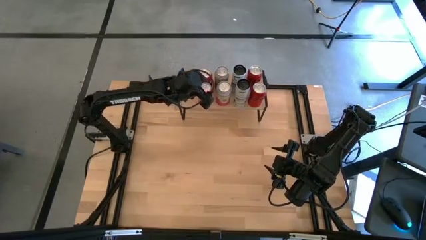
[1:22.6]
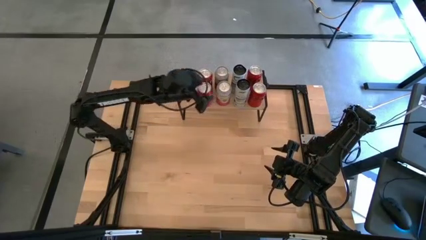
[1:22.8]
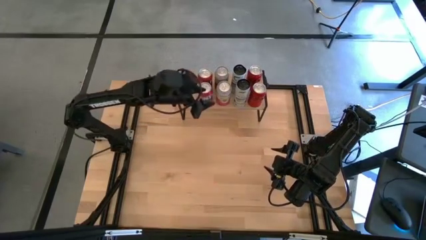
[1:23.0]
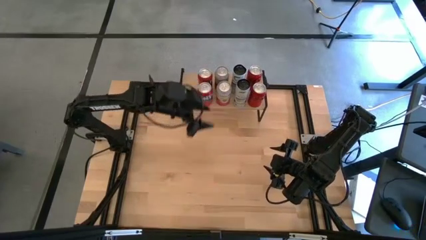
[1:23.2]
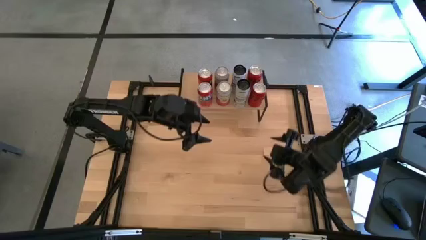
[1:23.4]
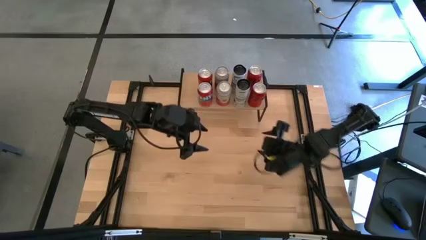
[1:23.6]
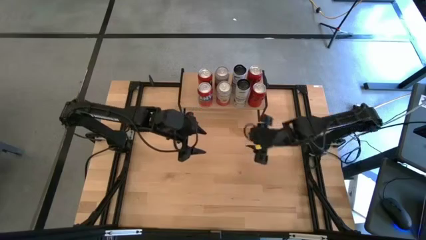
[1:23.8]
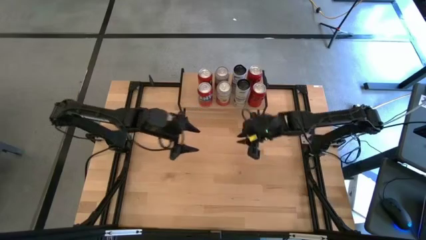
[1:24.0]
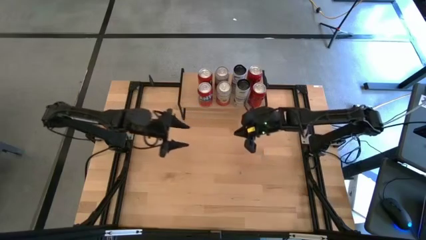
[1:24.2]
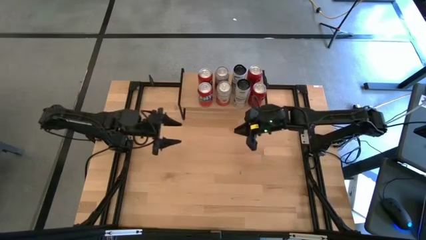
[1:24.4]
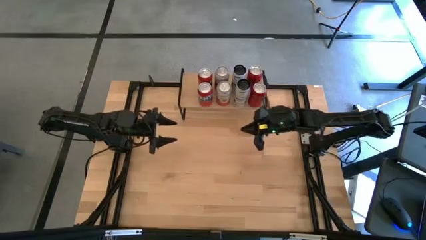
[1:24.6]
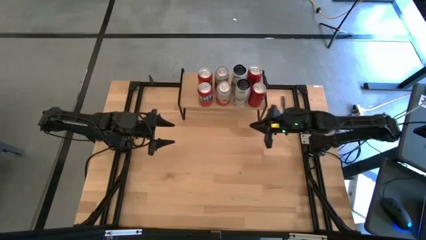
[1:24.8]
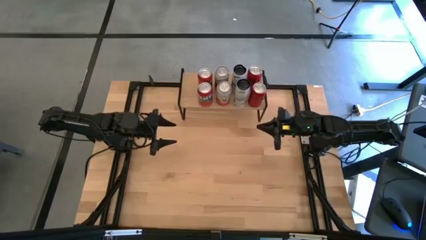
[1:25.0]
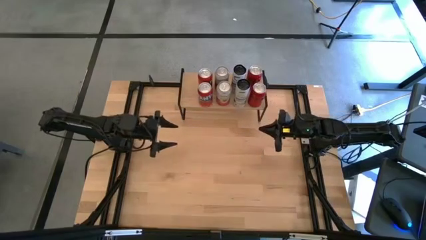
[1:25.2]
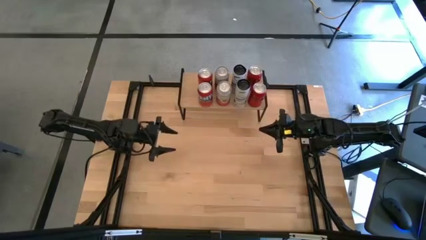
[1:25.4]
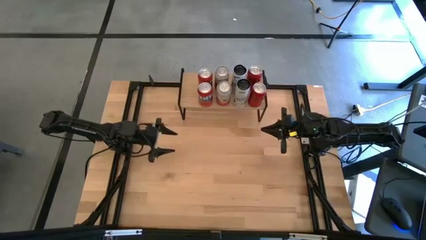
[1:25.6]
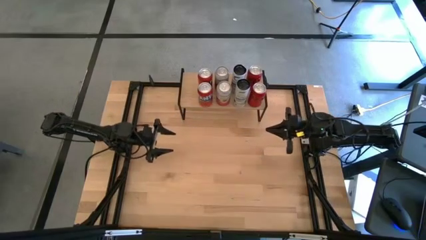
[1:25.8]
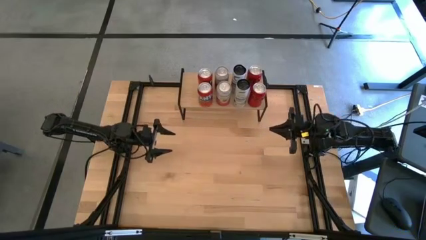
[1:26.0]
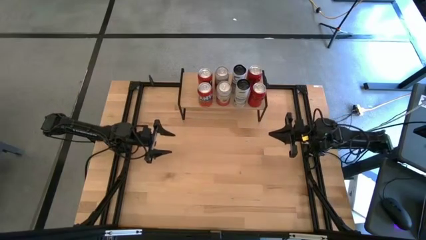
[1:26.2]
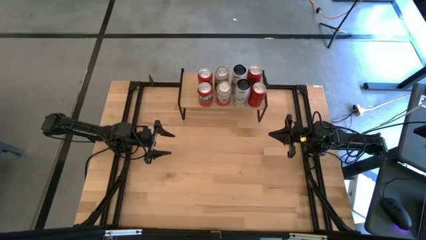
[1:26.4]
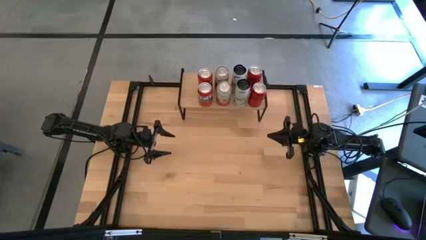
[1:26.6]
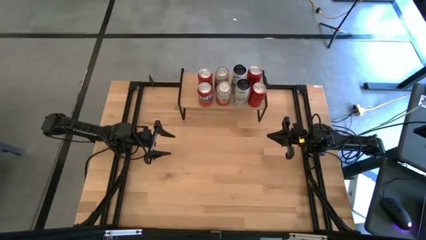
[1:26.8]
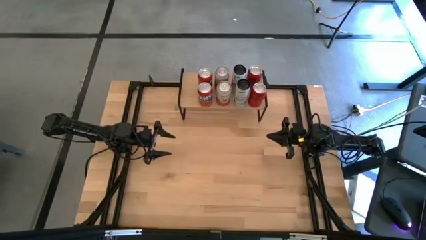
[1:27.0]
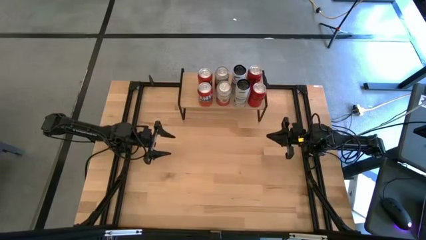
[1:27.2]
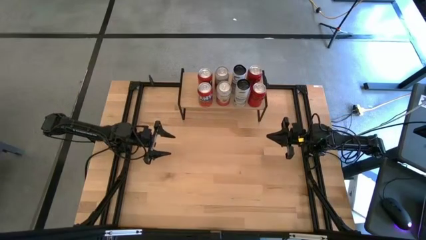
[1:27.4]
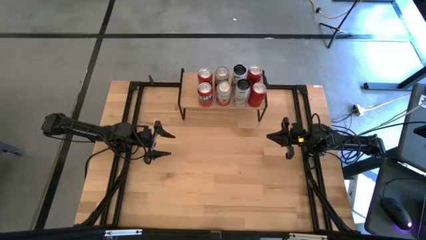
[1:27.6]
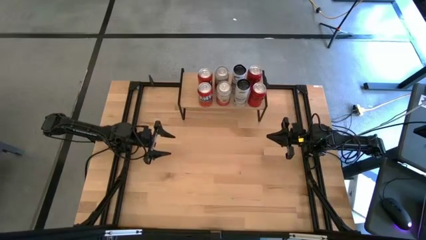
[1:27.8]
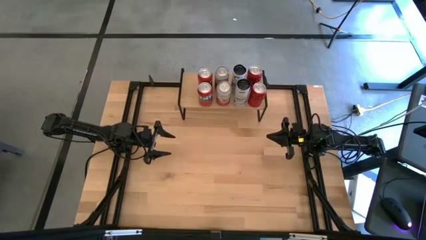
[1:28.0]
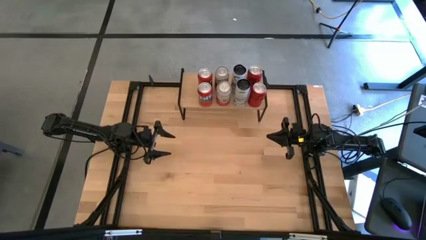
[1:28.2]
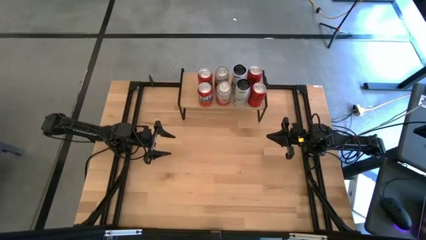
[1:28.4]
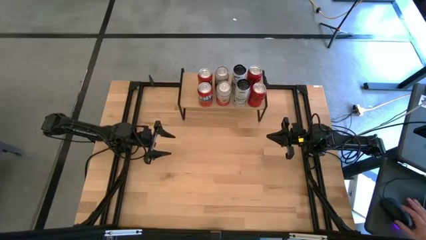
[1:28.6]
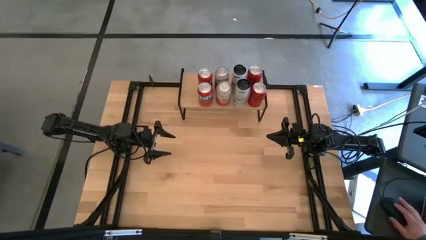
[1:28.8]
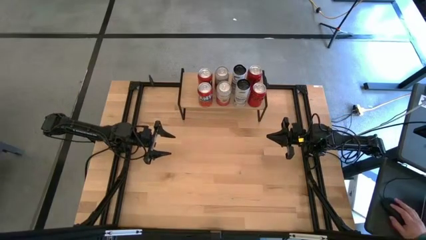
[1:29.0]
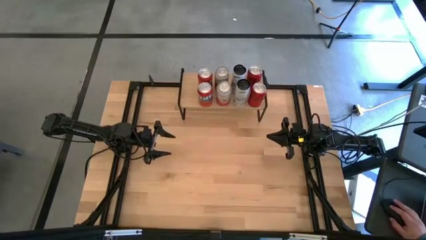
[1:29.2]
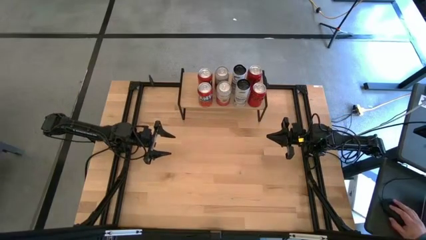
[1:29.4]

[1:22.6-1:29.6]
Task: Place canned beverage on shelf
Return to Home Position

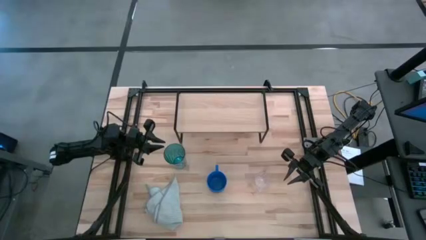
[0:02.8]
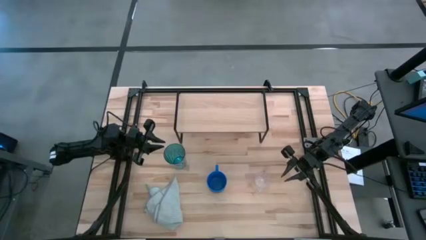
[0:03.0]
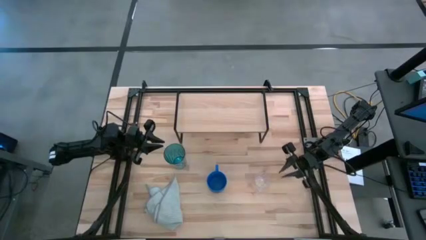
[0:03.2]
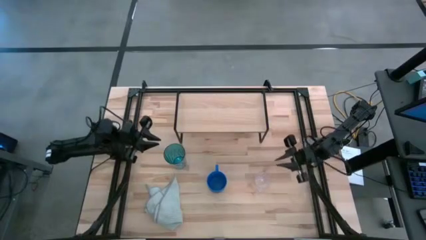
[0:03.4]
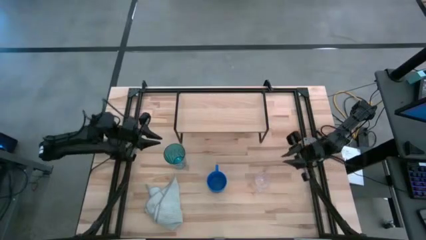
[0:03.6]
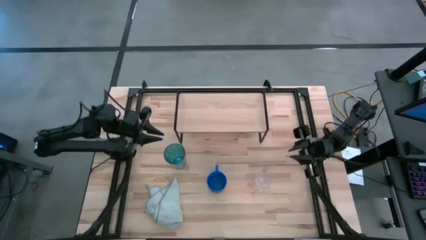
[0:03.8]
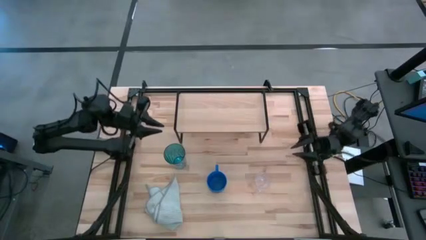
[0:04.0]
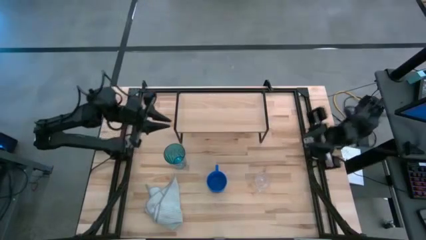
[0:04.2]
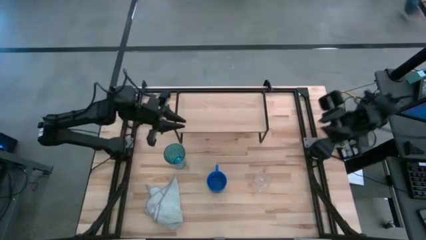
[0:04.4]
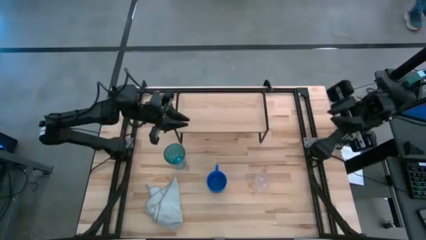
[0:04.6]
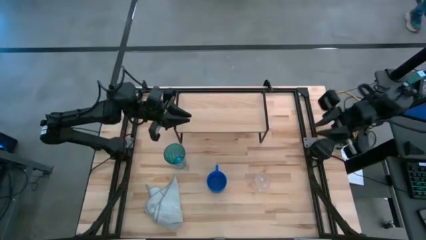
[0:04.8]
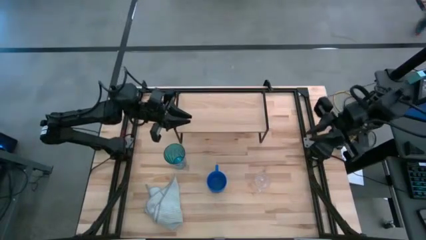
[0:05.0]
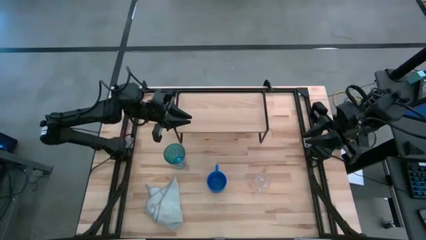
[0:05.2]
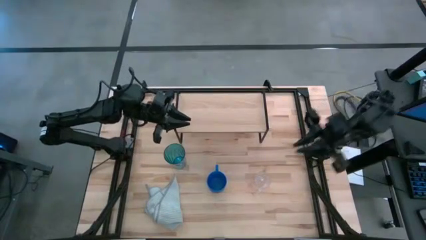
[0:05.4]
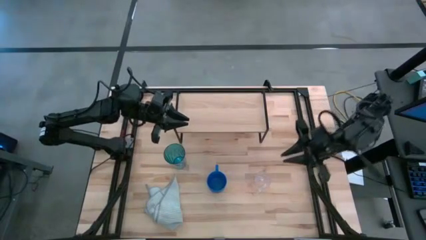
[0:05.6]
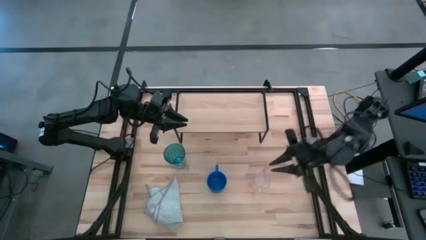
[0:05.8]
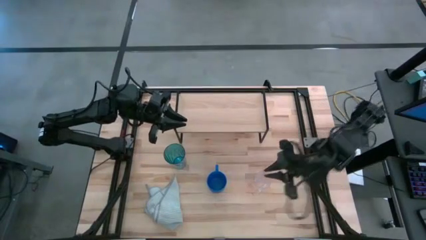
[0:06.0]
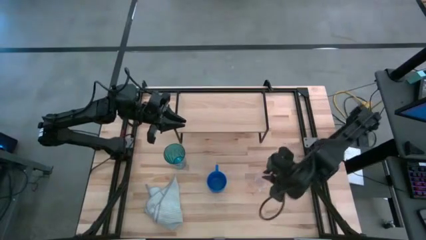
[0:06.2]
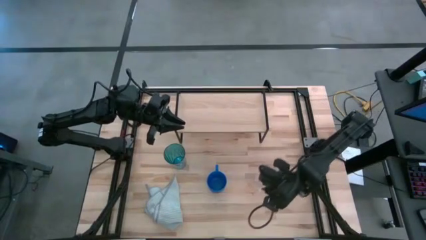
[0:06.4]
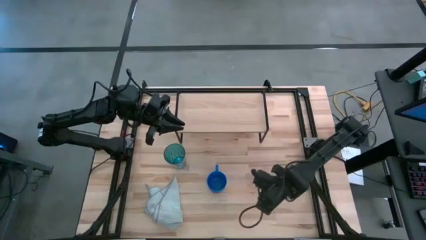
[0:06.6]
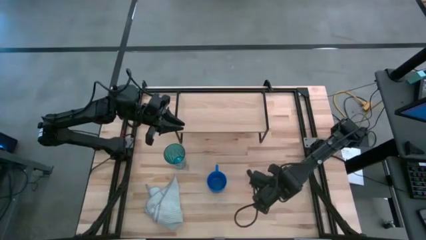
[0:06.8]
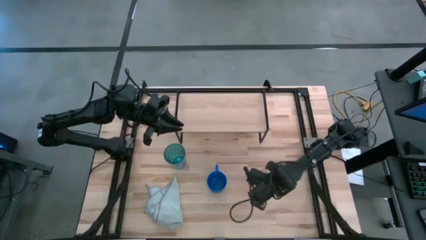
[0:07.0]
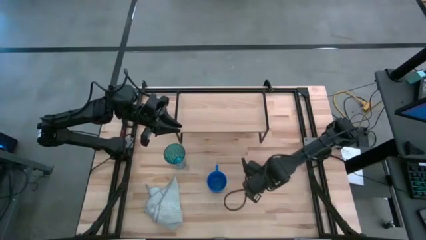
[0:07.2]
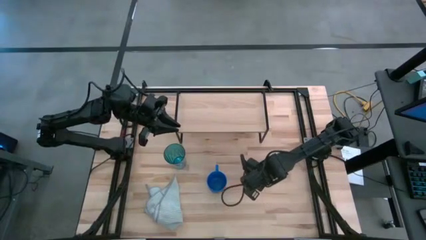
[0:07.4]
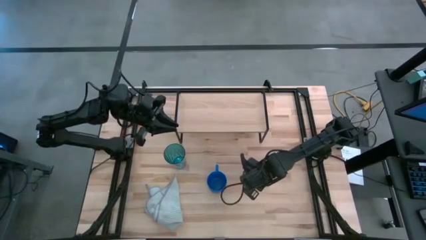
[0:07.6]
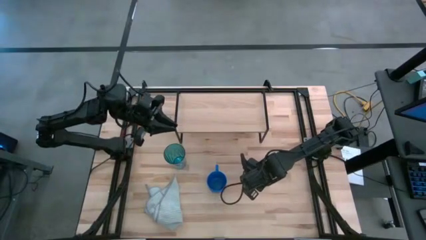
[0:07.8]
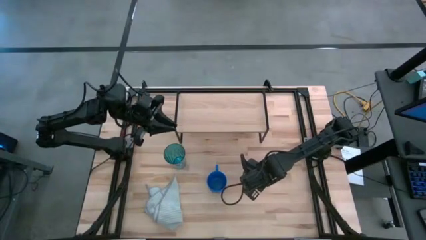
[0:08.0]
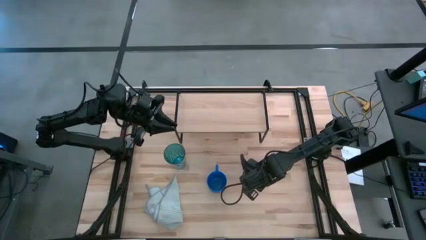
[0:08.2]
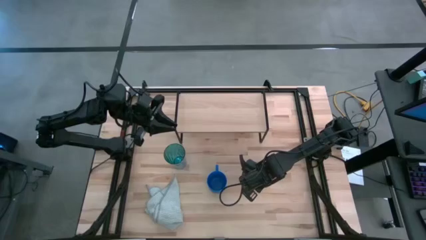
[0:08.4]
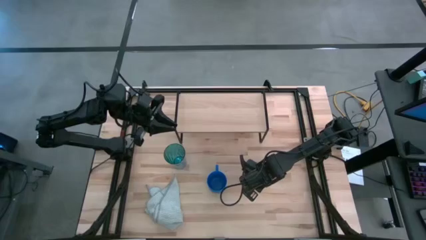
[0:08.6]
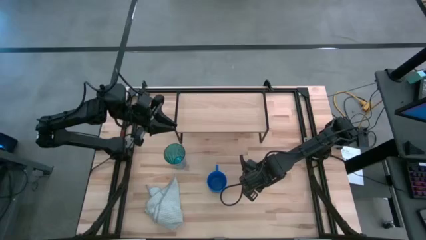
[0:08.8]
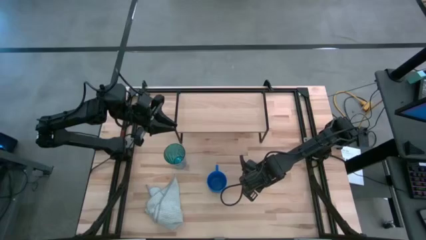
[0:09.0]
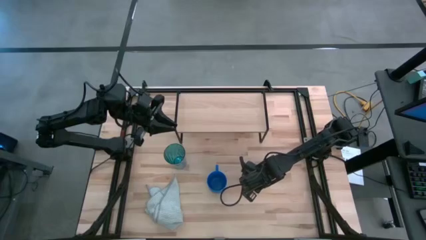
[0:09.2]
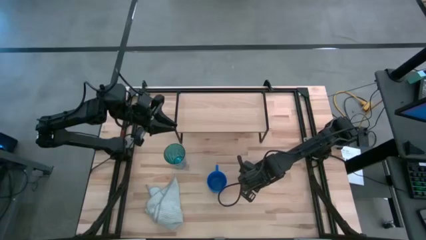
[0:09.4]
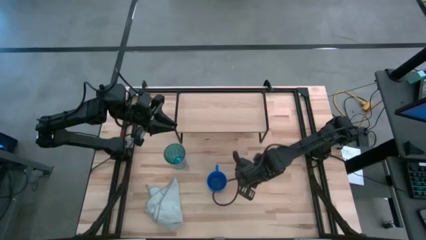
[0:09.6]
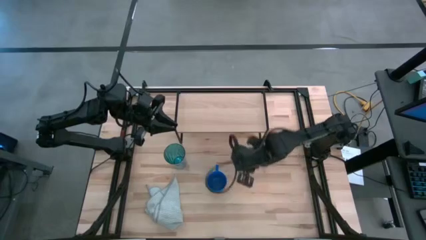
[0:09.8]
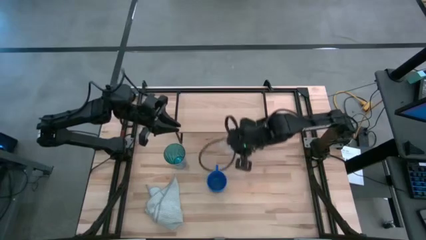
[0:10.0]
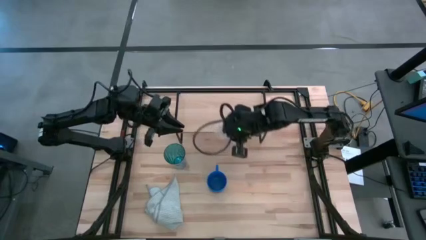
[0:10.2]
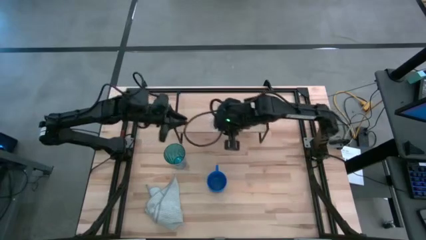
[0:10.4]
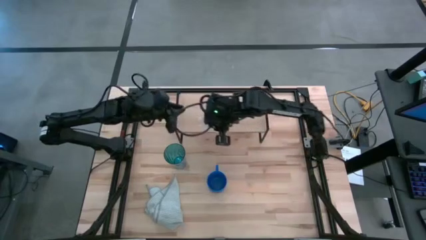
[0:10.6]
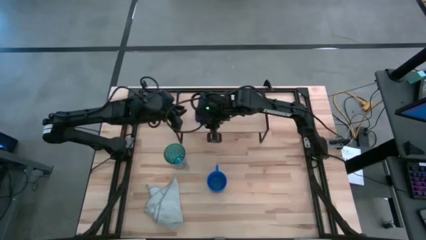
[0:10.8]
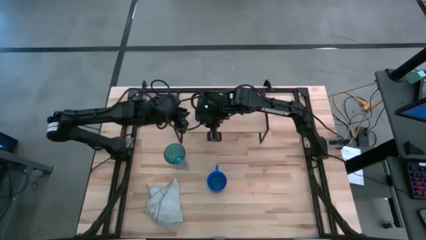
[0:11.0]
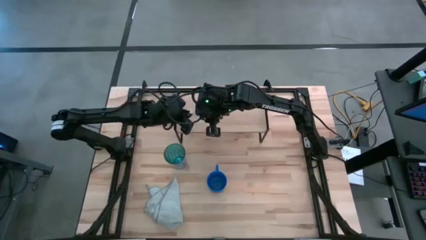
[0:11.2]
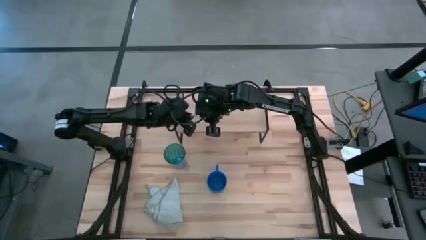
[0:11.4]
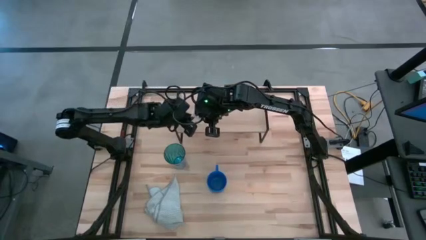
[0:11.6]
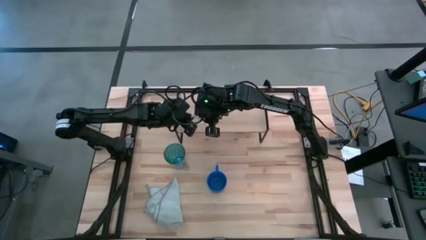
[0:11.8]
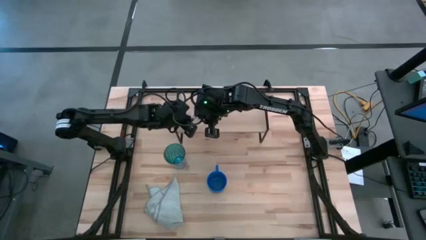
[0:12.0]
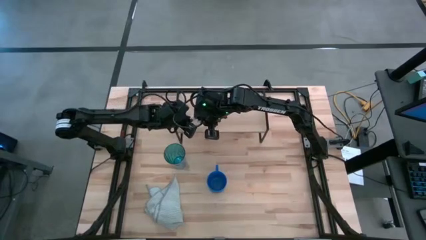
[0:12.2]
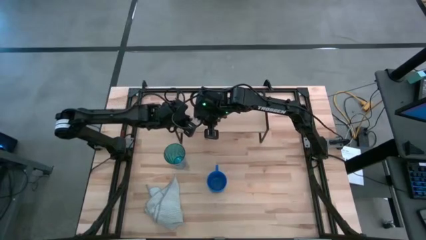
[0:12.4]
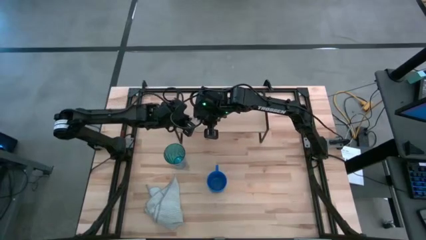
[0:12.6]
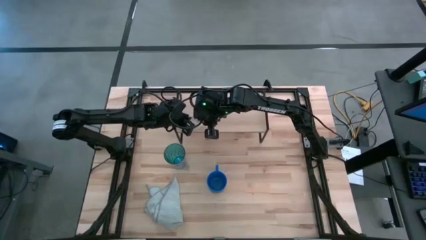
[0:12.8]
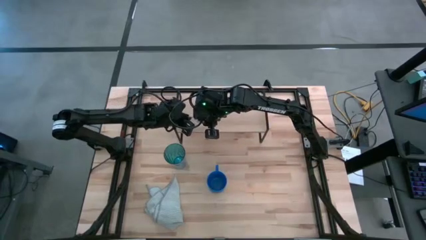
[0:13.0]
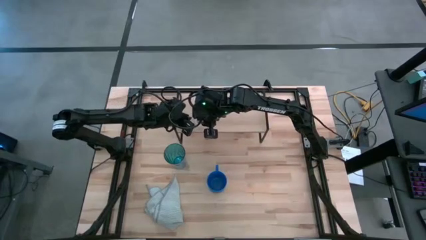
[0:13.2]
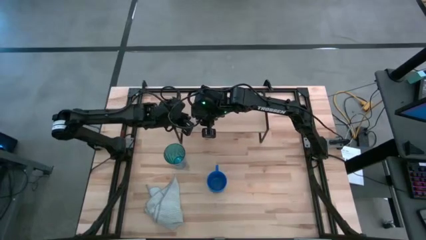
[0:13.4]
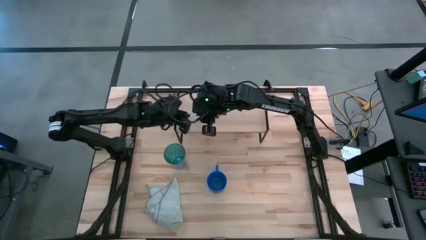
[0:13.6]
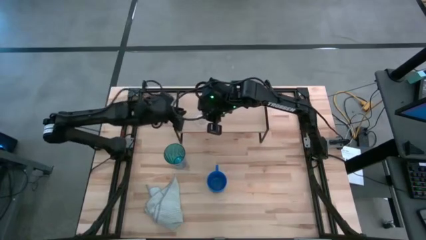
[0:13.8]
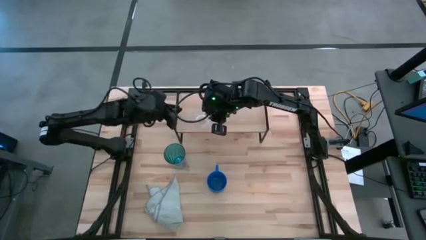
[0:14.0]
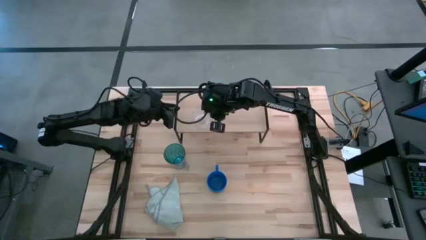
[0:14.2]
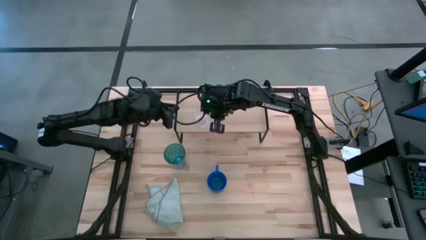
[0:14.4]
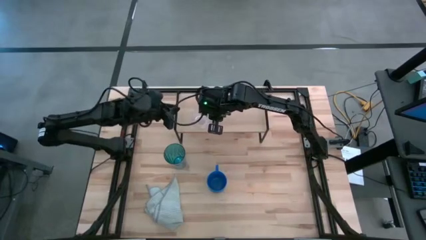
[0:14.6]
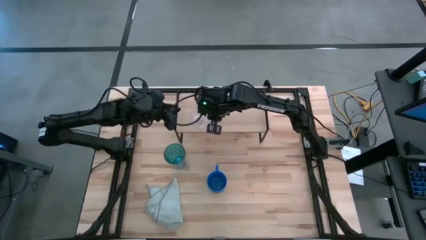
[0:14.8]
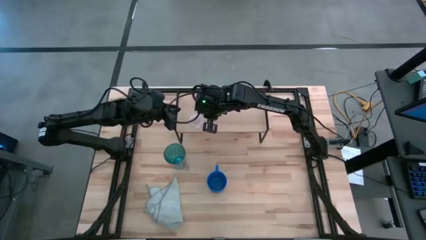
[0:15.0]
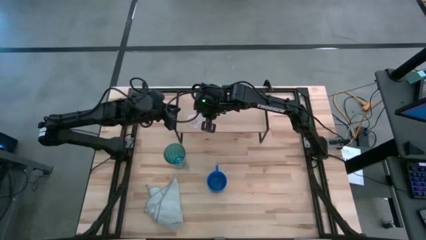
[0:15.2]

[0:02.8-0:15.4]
Task: Stack small to large cups/mugs on shelf
Put the transparent mug on the shelf
